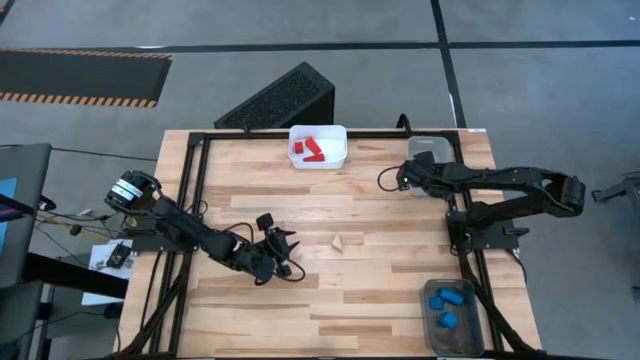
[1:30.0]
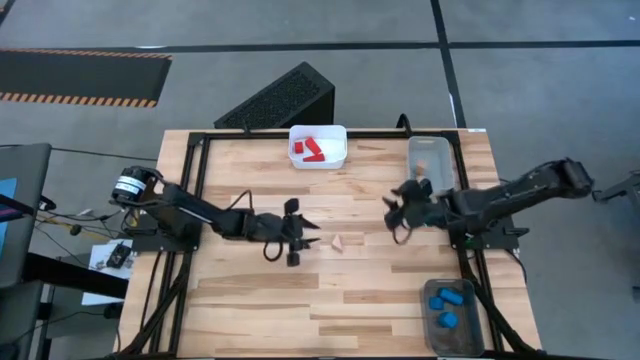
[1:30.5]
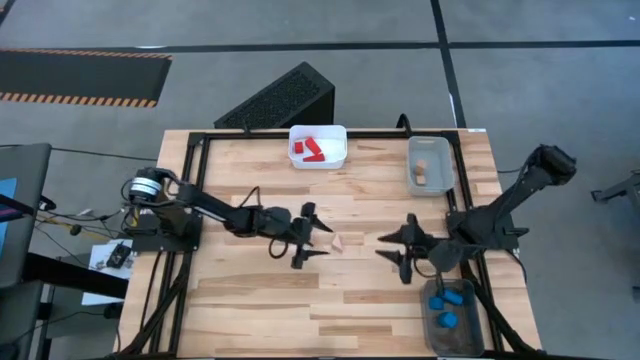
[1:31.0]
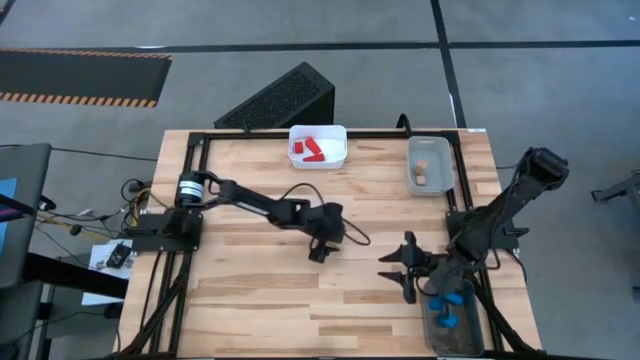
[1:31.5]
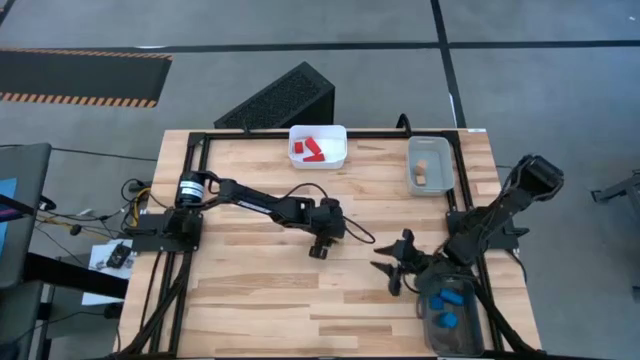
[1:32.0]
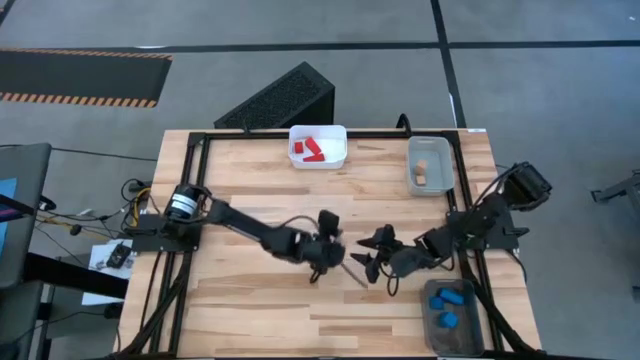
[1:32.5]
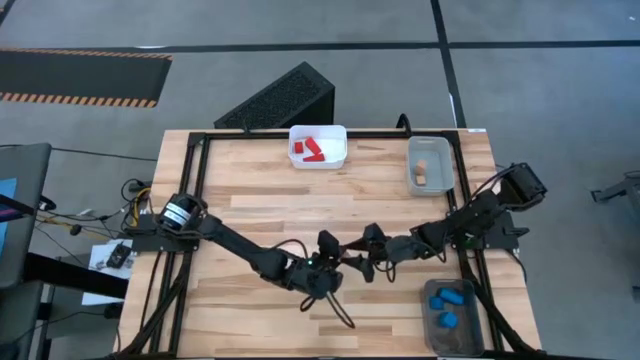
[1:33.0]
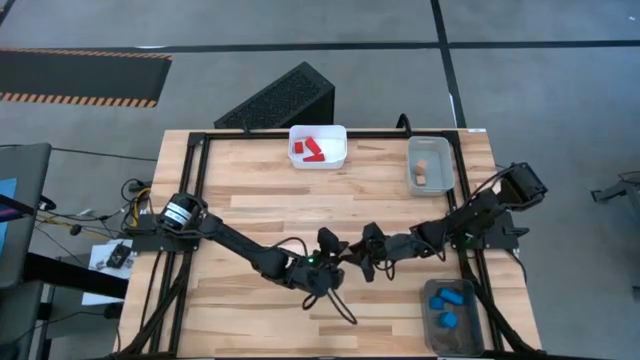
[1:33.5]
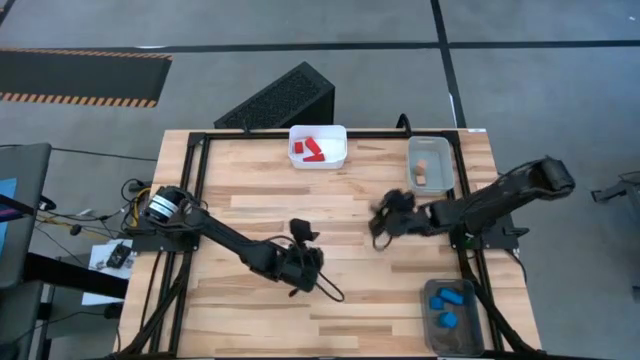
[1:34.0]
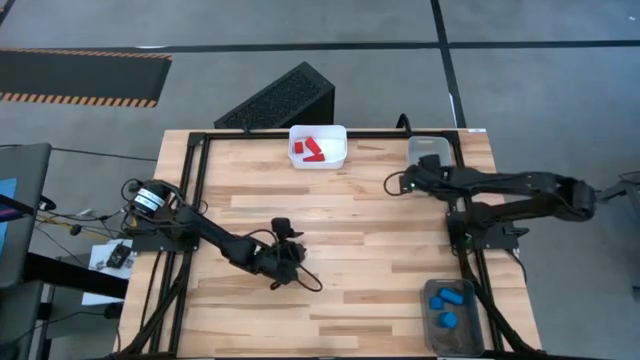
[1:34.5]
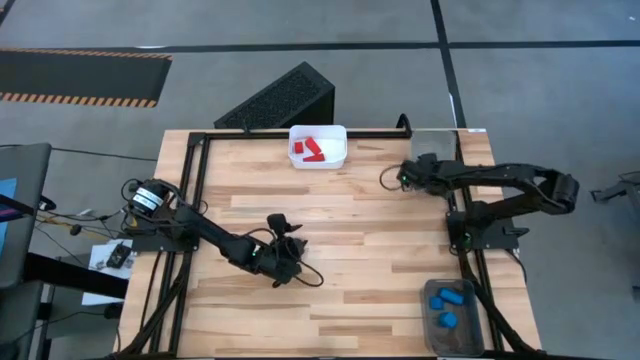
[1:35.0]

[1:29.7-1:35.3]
Task: Sort & place blocks by color
Put the brown block into the gray bin

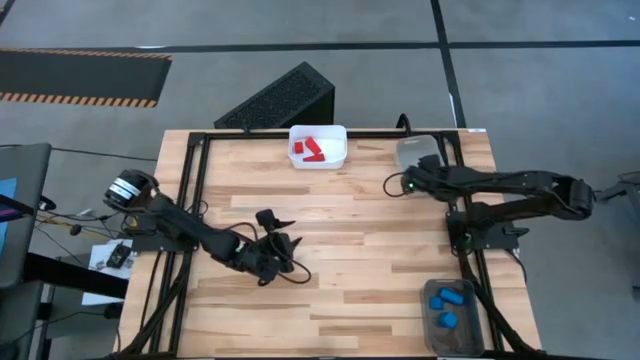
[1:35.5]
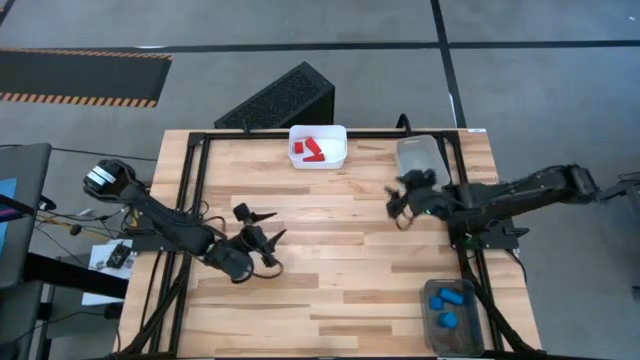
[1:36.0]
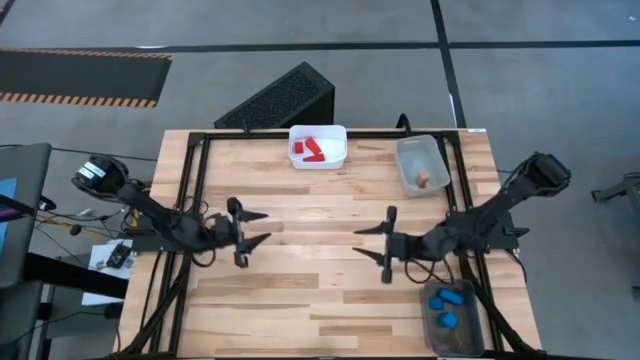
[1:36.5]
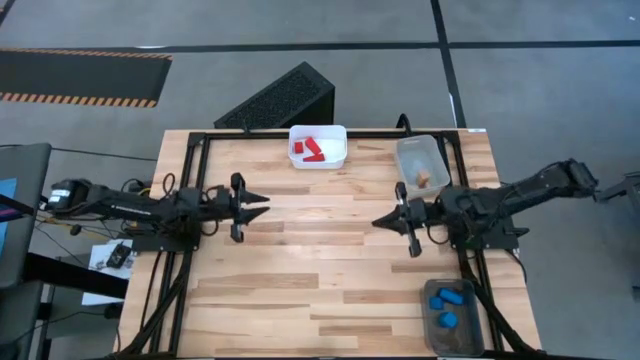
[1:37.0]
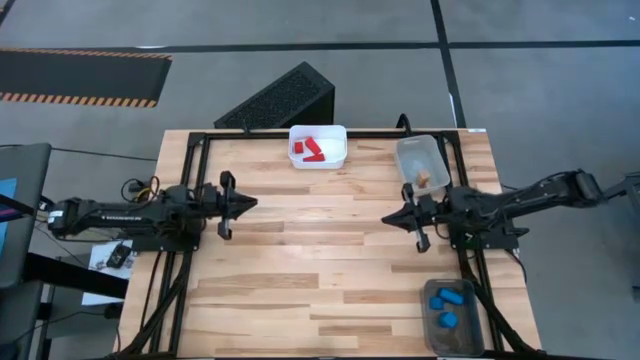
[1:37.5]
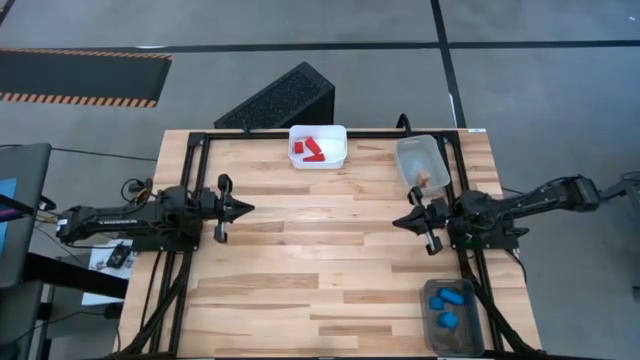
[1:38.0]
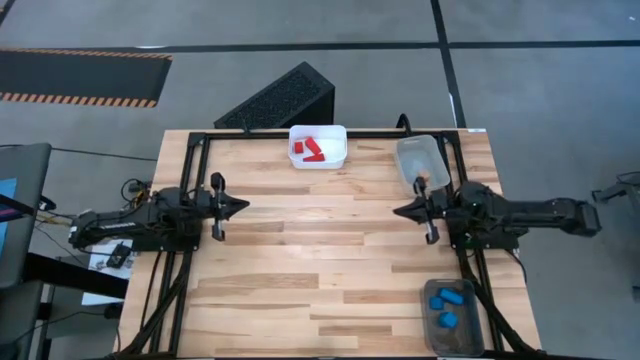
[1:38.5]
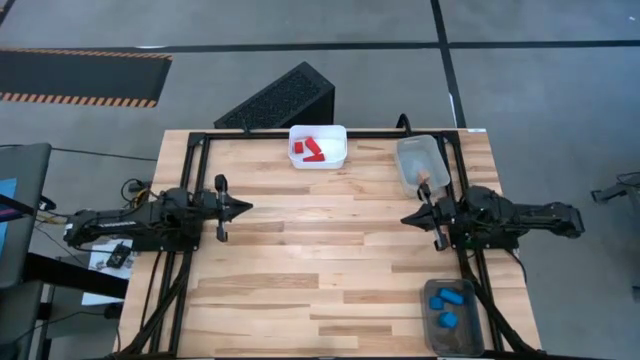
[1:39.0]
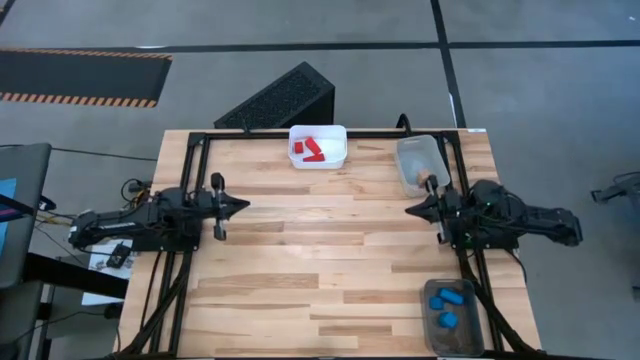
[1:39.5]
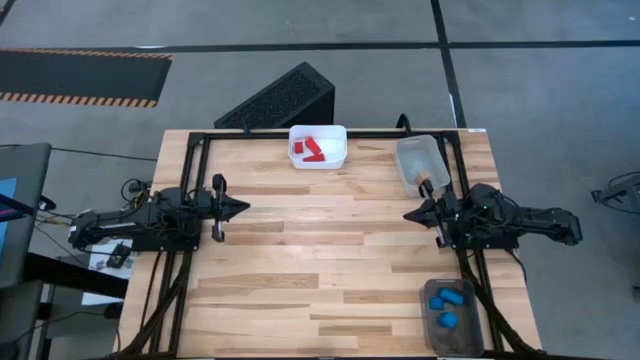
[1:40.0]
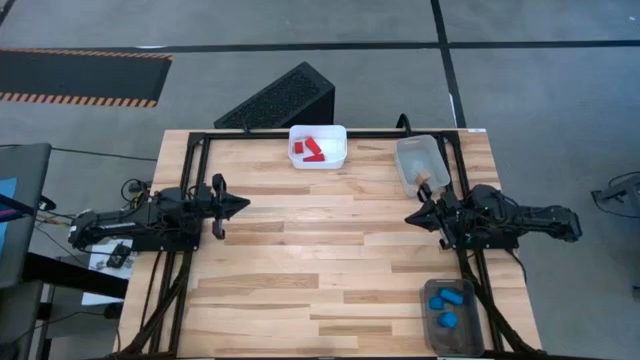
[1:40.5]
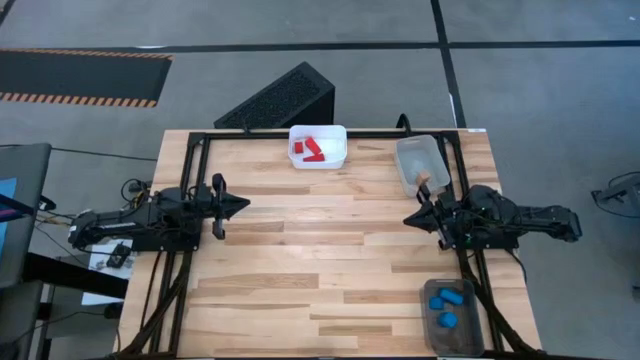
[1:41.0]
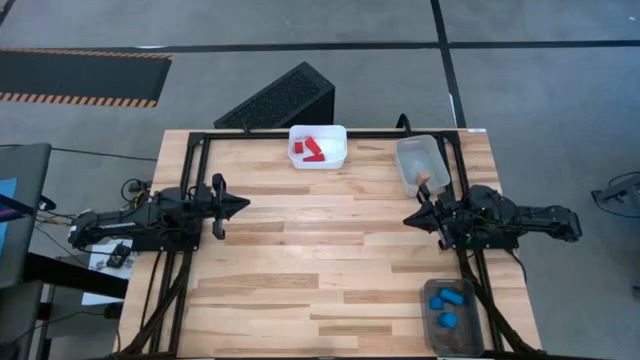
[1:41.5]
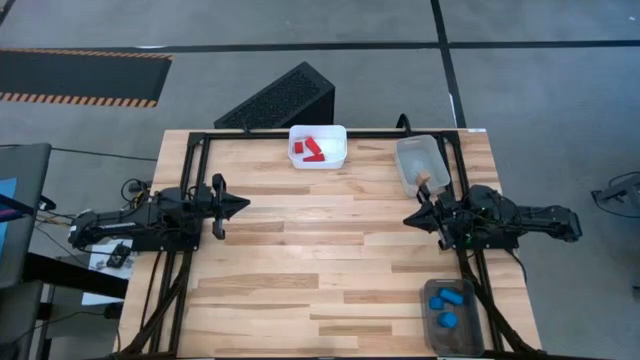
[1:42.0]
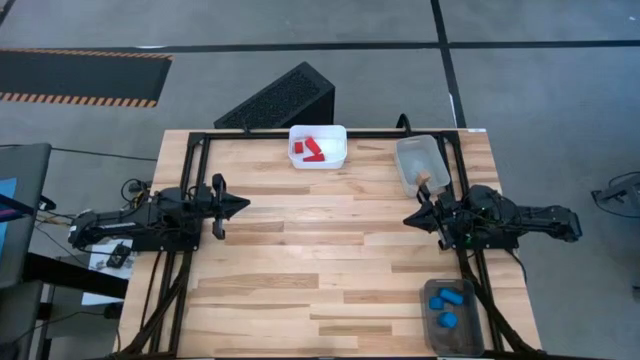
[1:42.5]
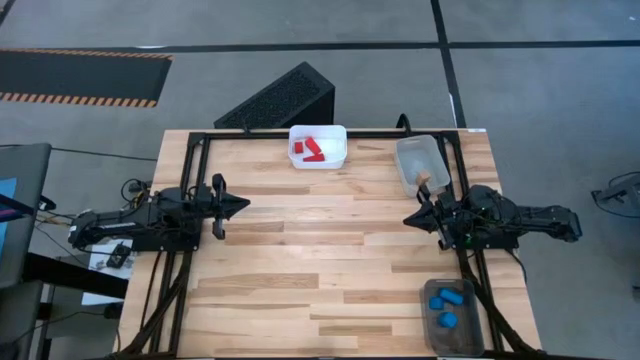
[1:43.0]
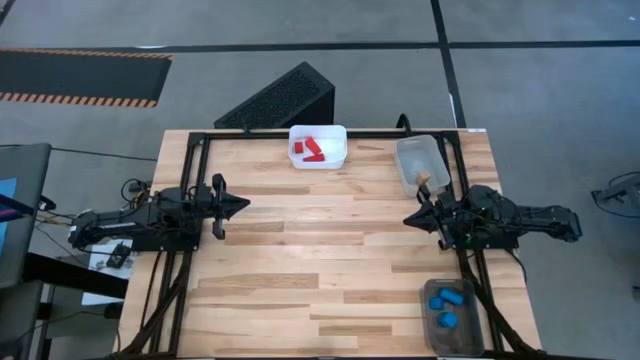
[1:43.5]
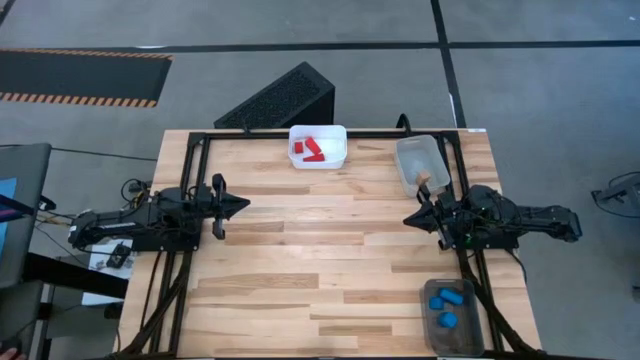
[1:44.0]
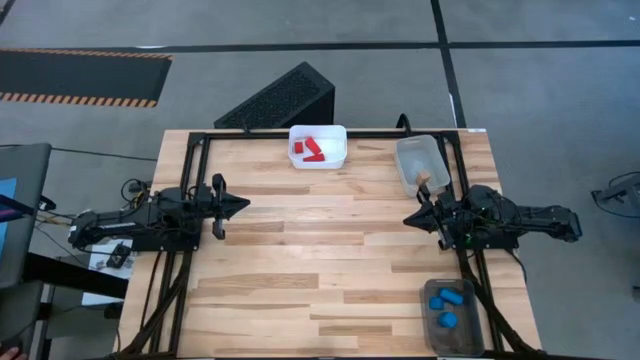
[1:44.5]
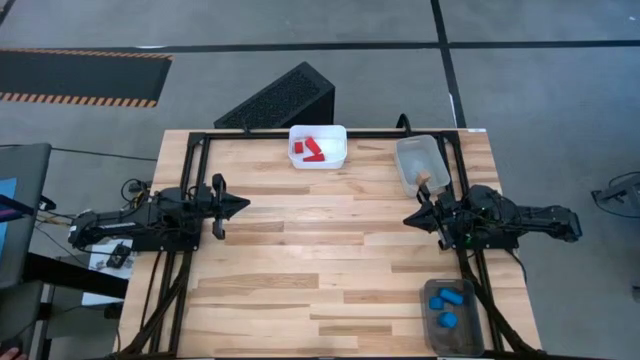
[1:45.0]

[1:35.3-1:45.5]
Return to Home Position

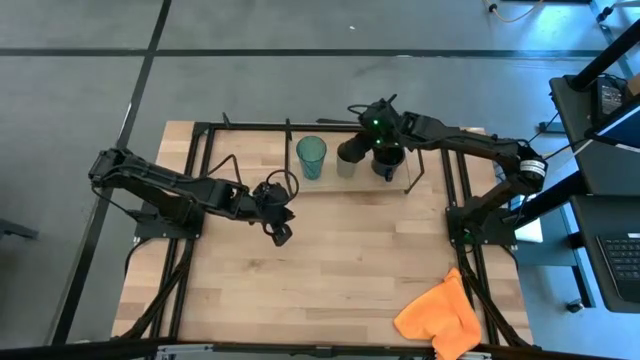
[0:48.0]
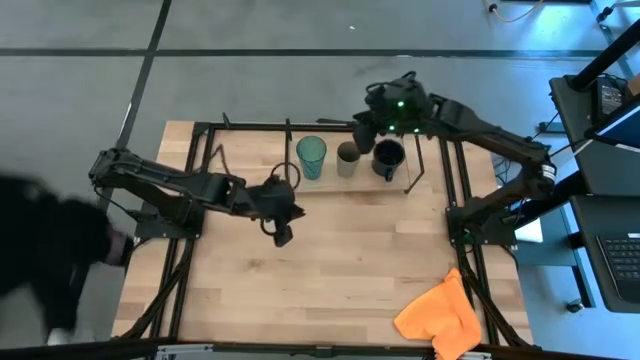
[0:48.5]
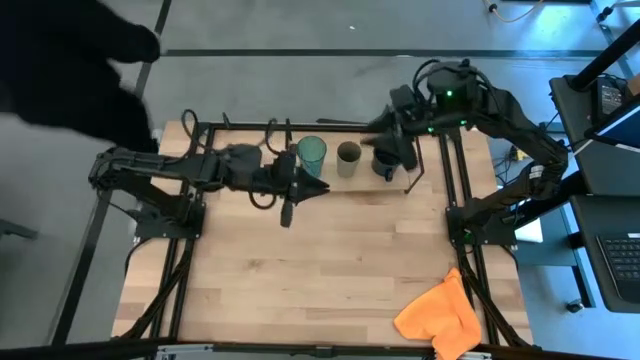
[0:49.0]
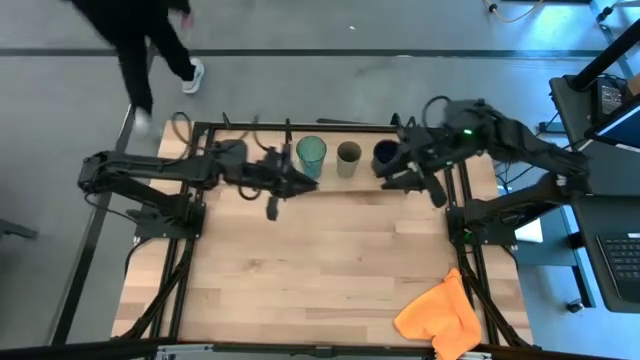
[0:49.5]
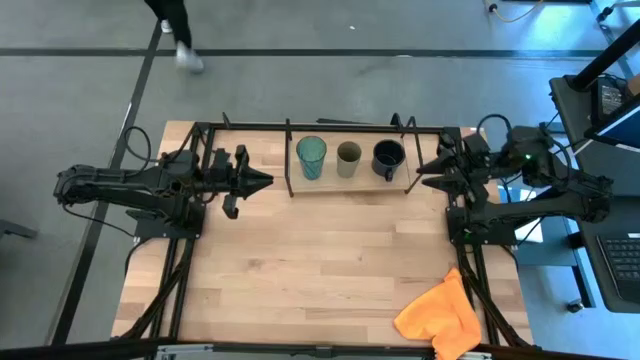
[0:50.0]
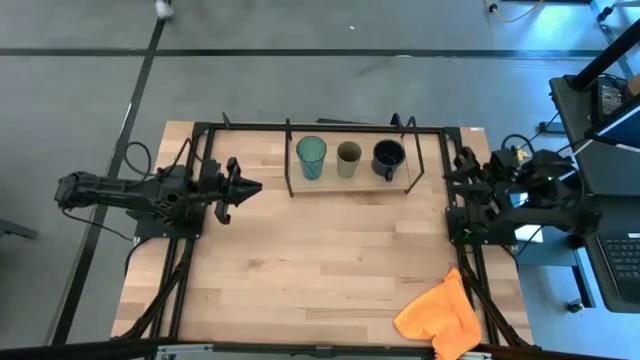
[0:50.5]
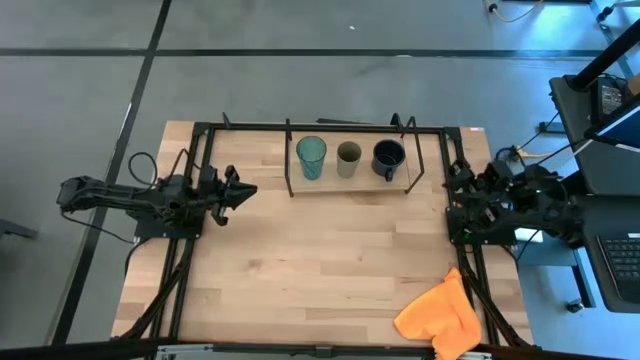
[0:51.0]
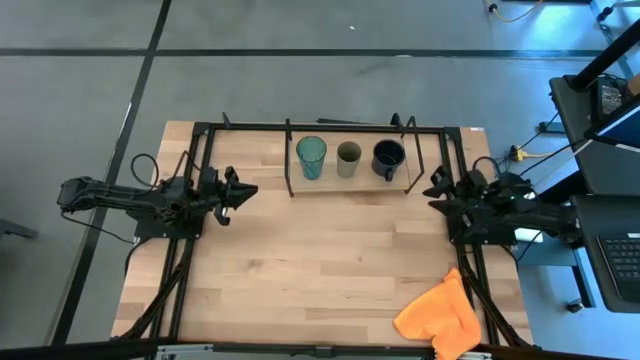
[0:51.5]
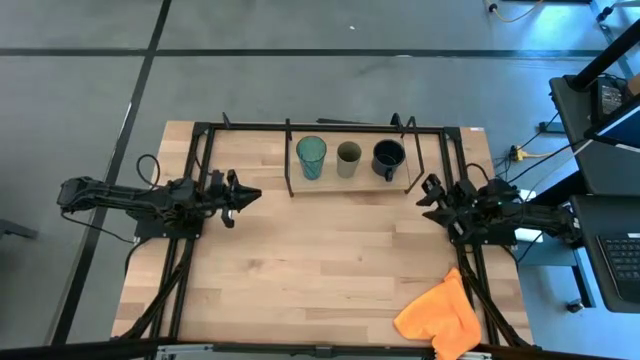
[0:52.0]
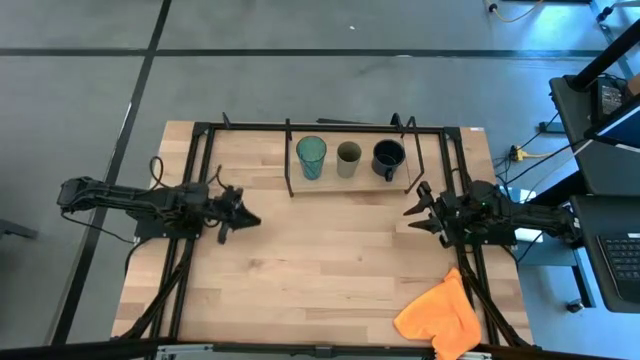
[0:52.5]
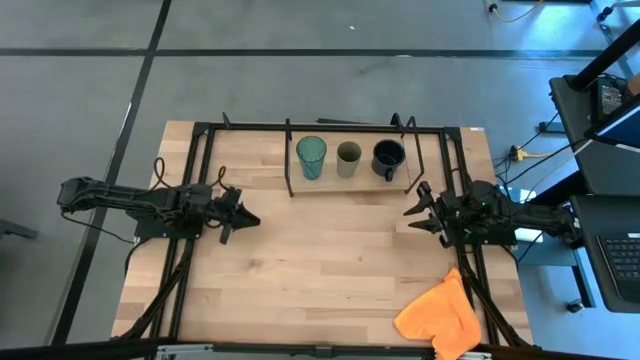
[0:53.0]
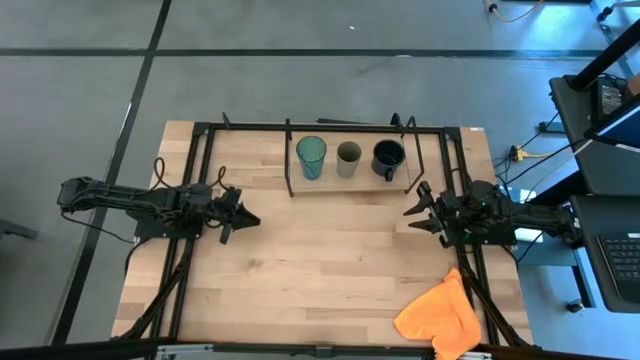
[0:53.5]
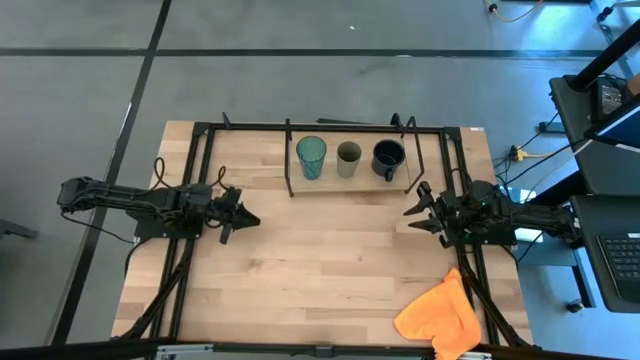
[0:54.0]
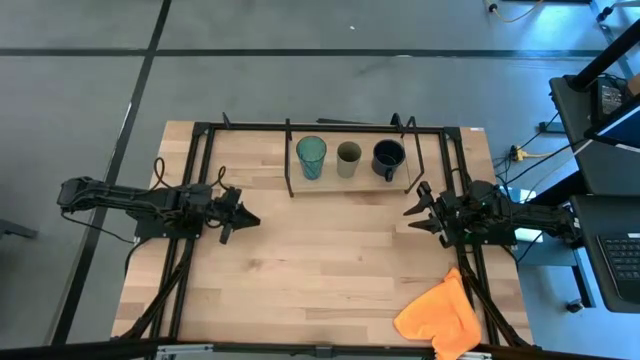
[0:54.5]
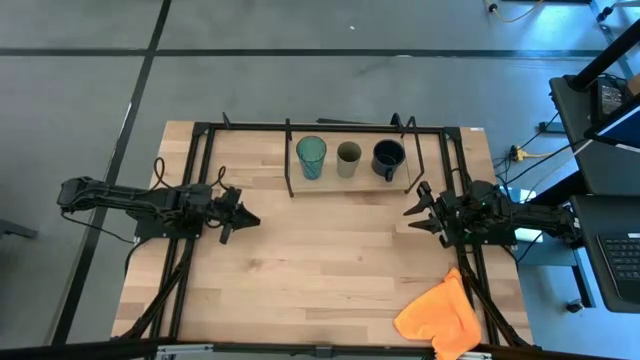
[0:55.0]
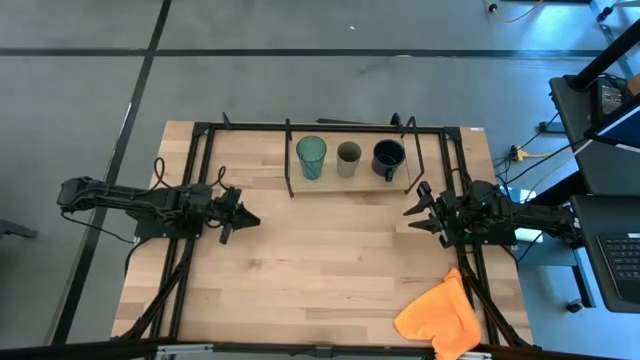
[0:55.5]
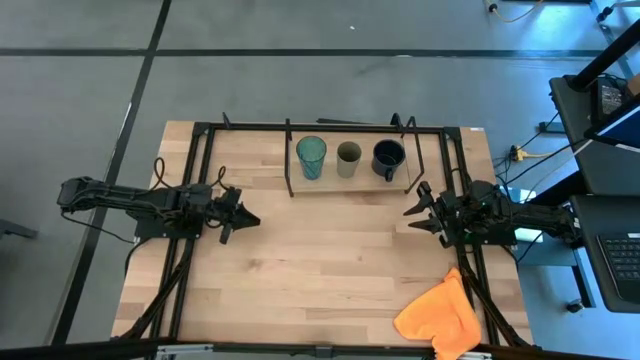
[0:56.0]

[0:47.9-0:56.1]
Task: Stack small to large cups/mugs on shelf
Return to Home Position
